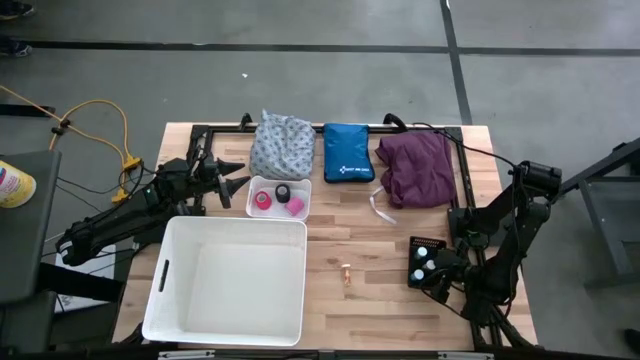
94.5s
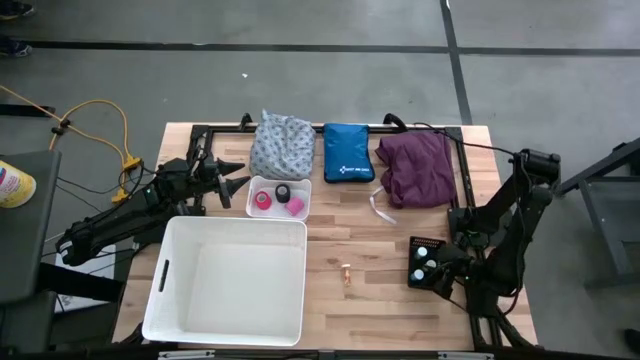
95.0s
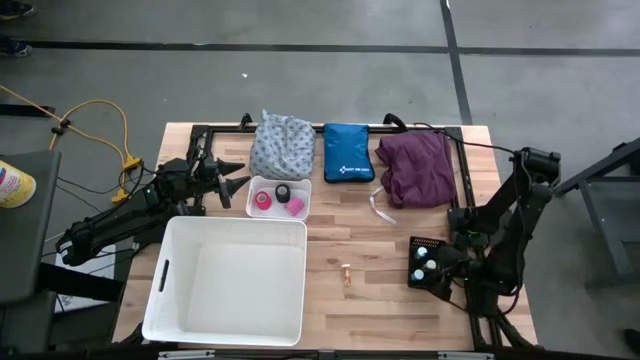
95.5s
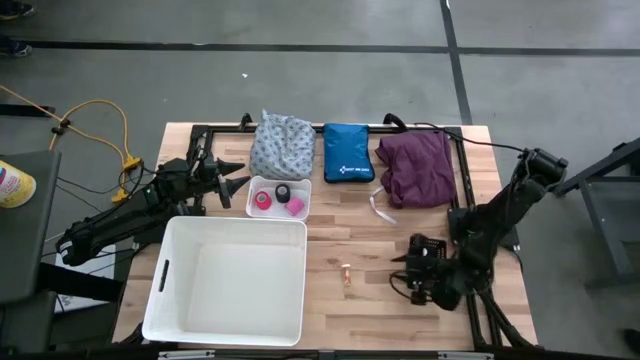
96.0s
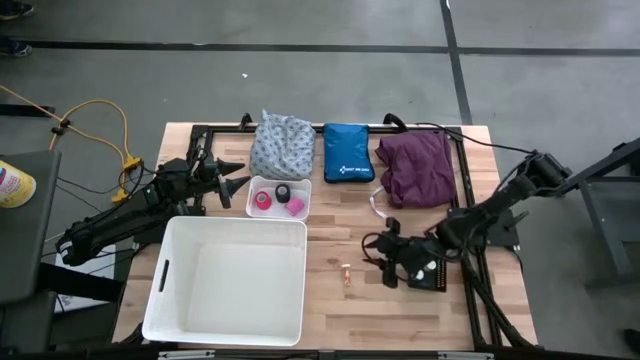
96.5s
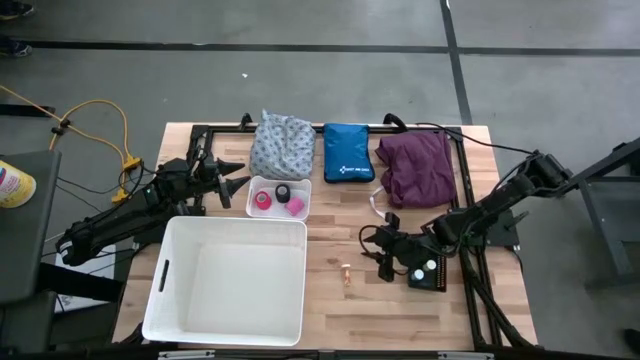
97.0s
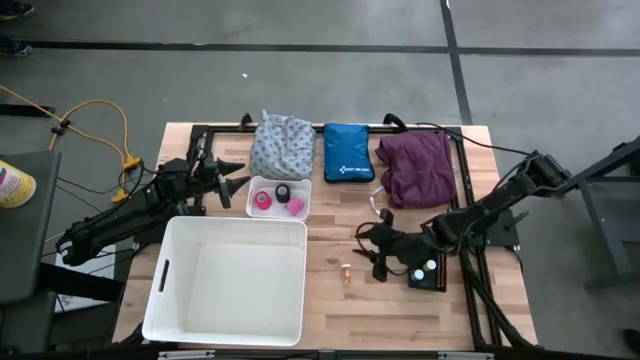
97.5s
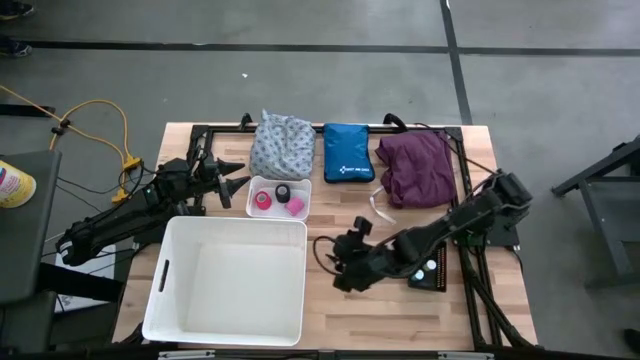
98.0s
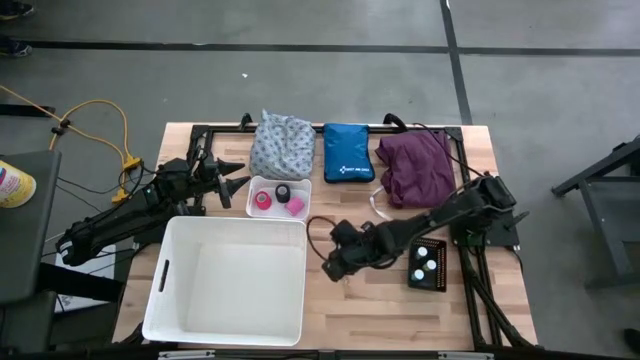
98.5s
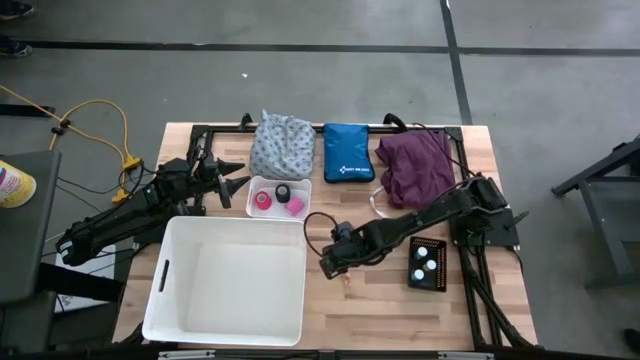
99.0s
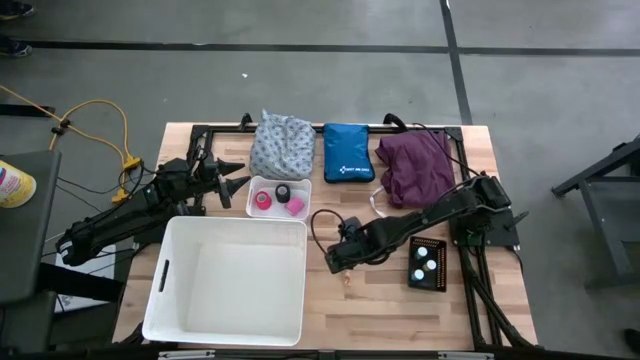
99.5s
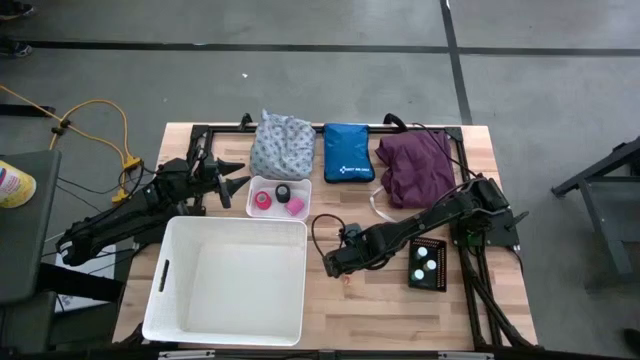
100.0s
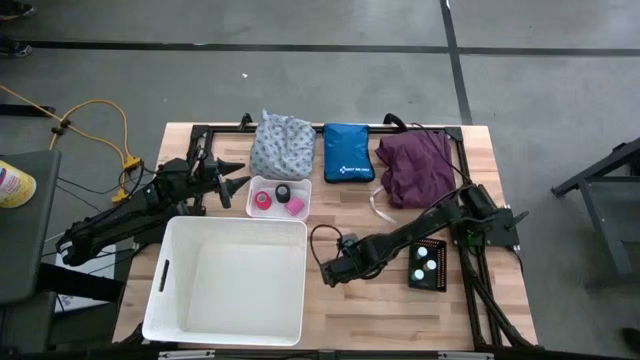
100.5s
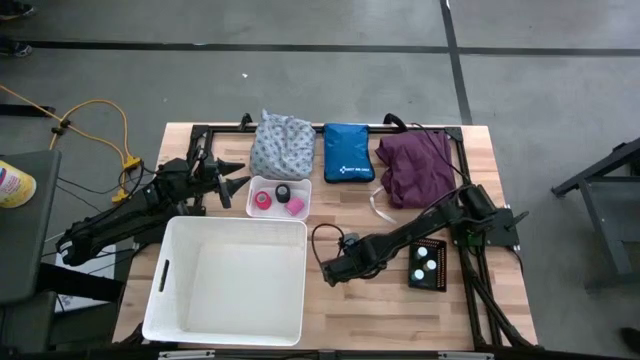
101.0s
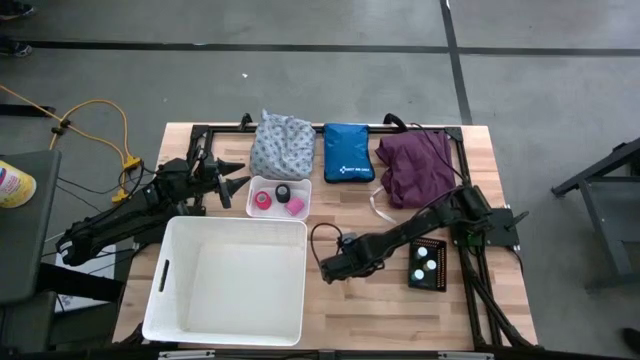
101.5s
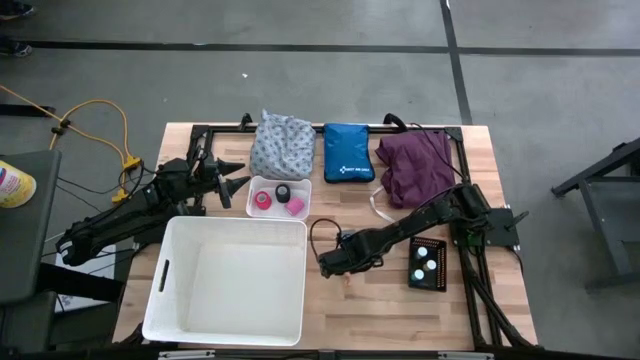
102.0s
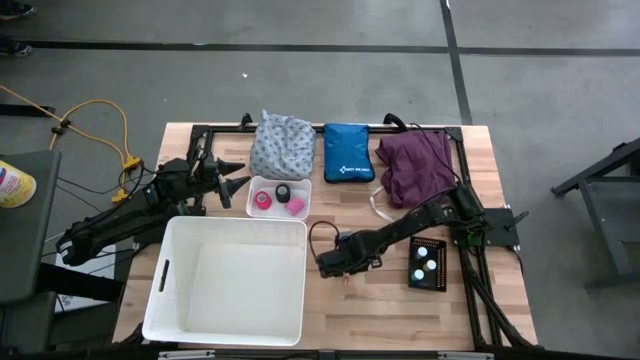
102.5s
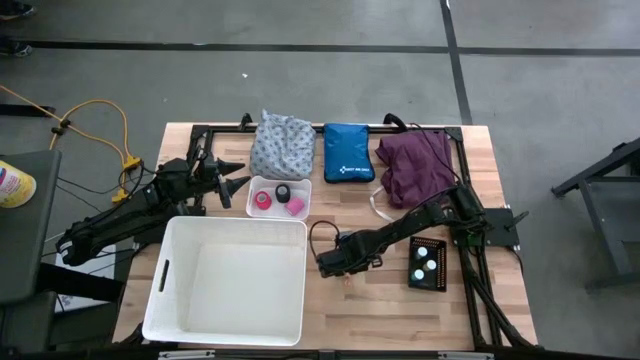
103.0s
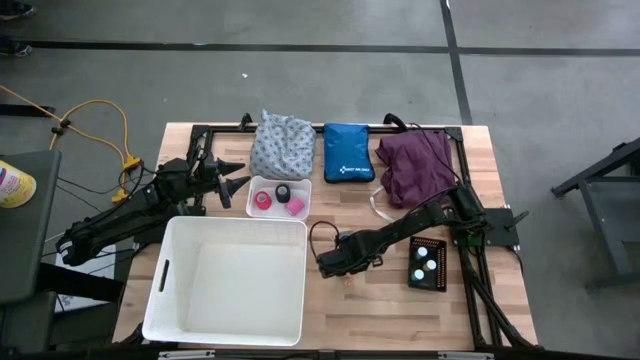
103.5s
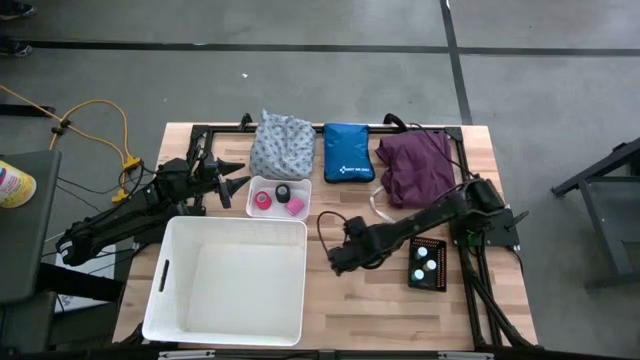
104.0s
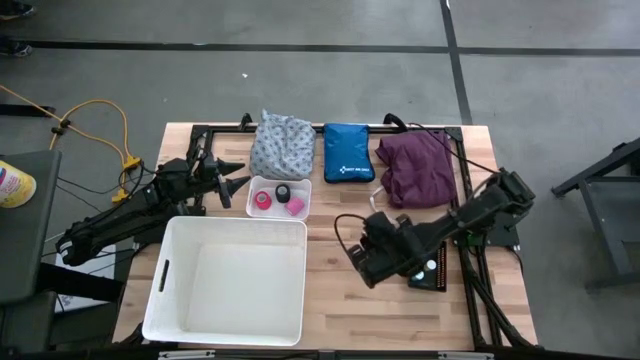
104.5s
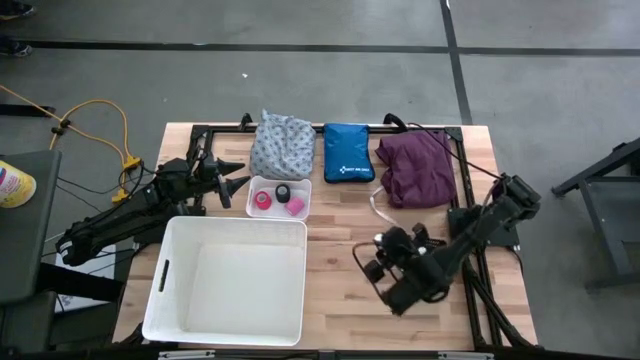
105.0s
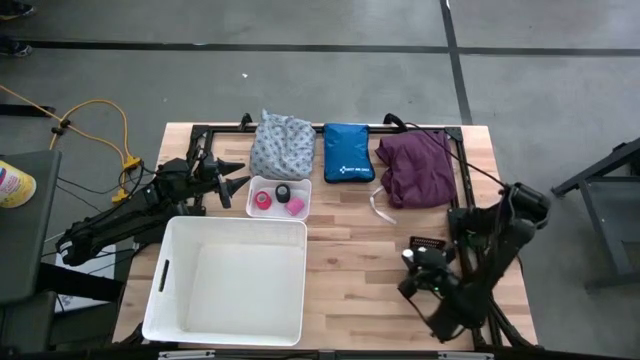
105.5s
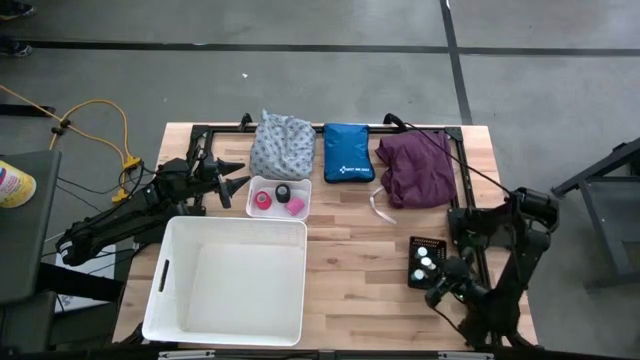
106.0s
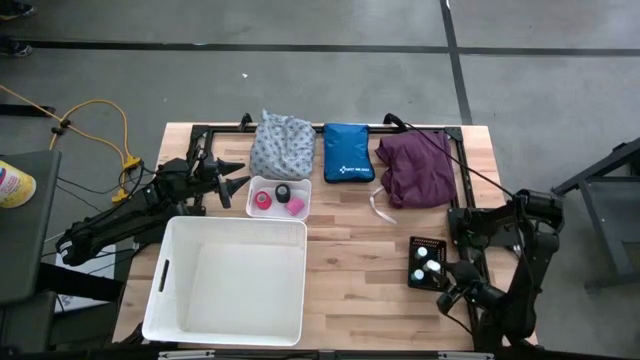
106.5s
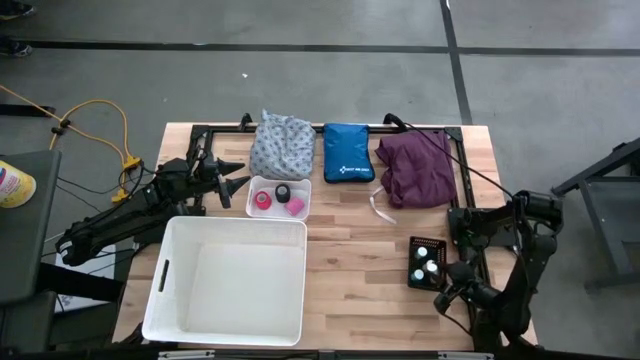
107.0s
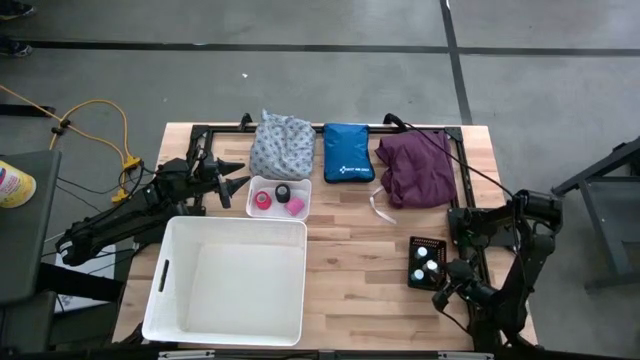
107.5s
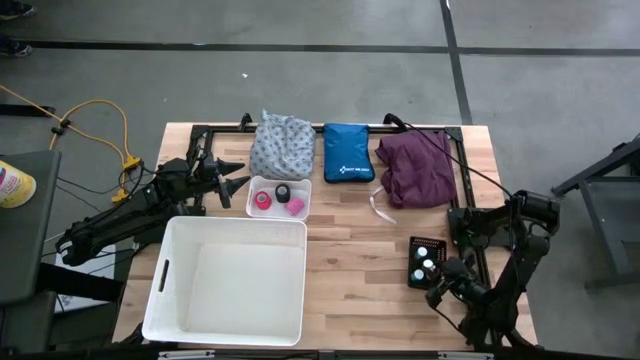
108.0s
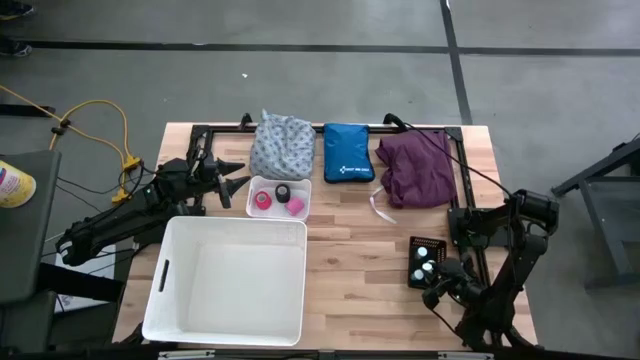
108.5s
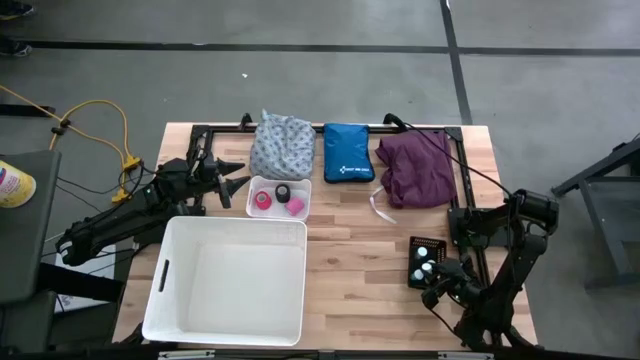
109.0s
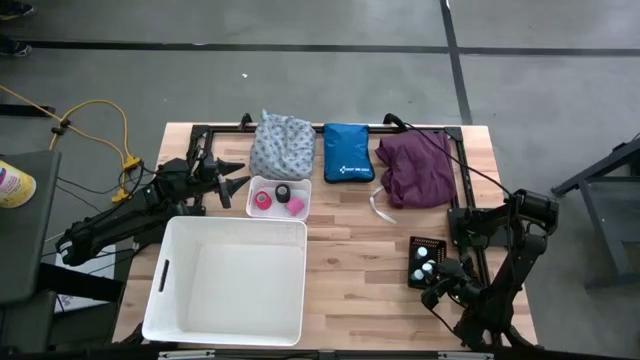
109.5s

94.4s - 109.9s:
Task: Pick & place medical supplies in basket/bin
Put the yellow pill bottle into the black bin

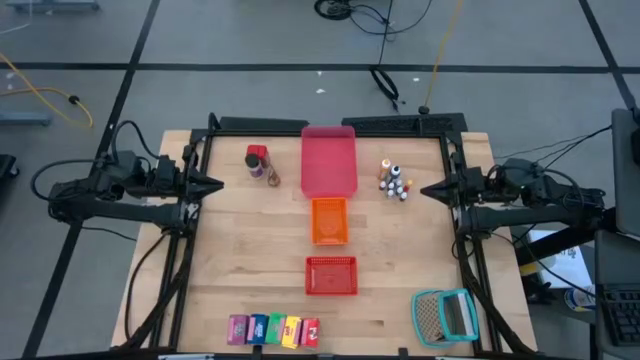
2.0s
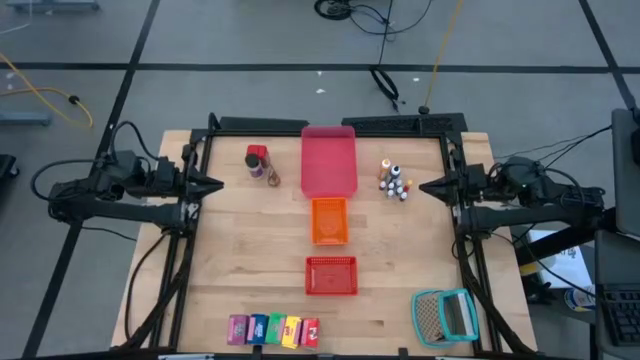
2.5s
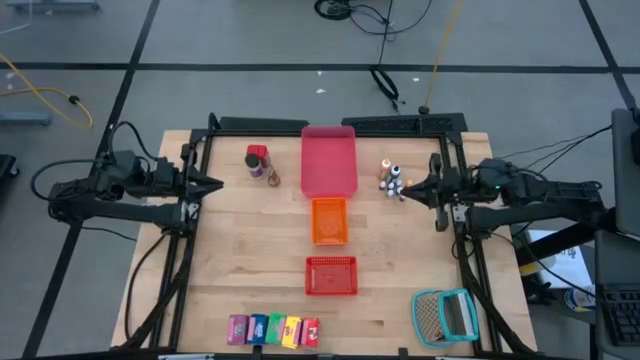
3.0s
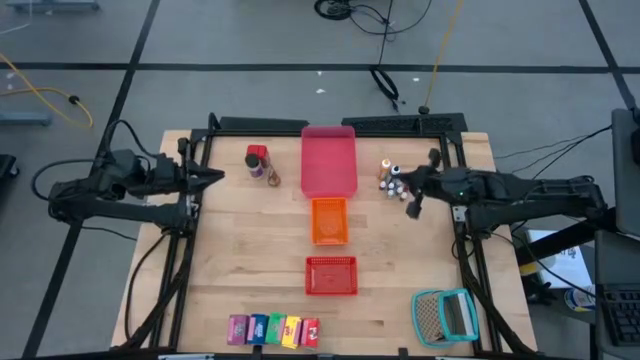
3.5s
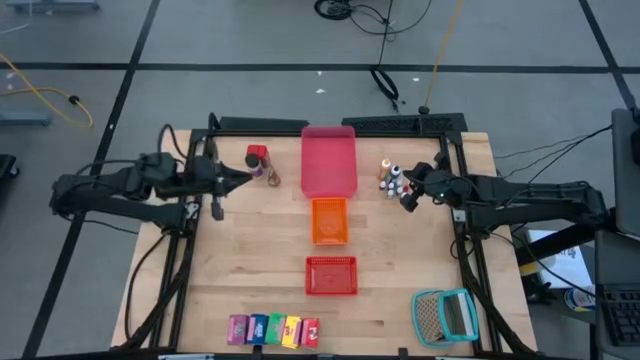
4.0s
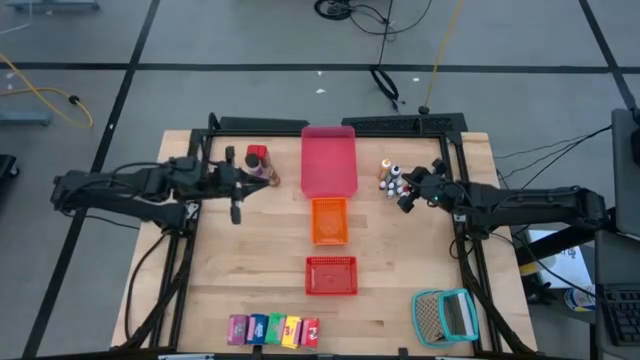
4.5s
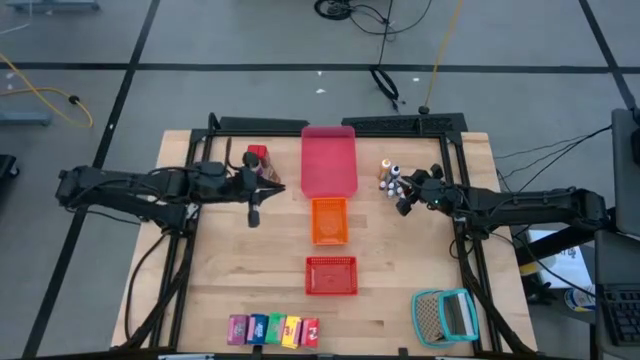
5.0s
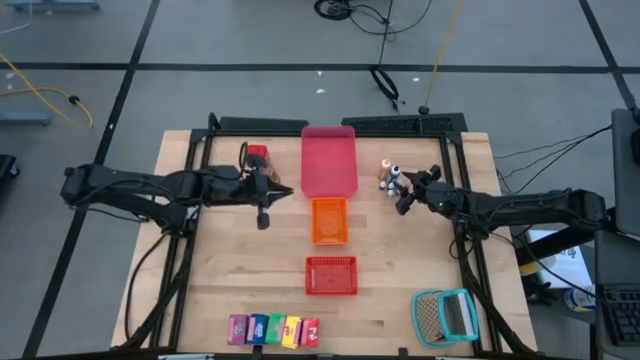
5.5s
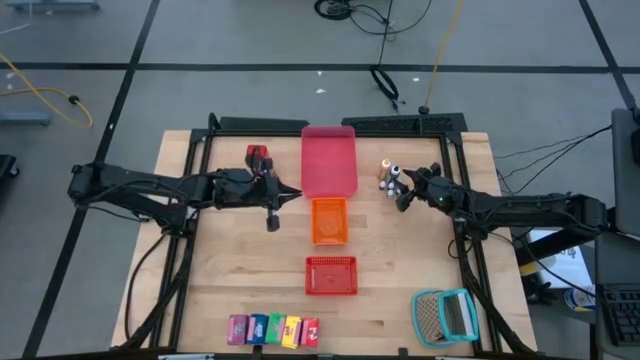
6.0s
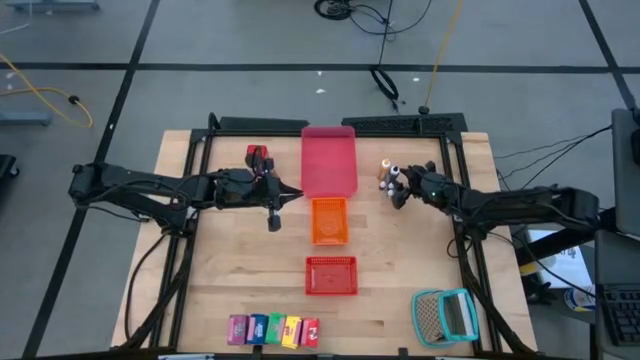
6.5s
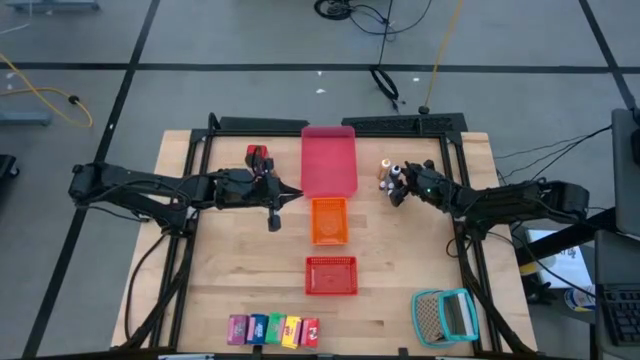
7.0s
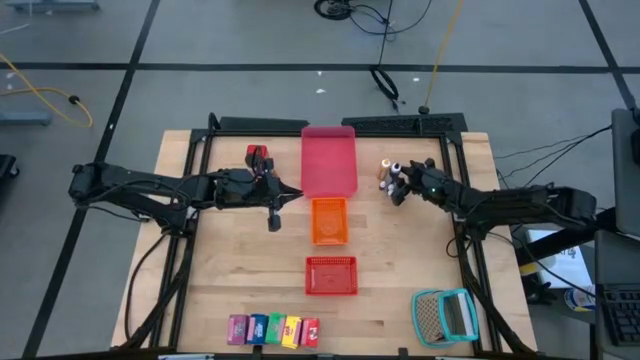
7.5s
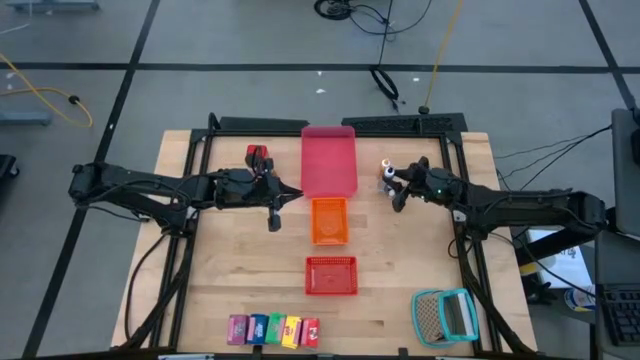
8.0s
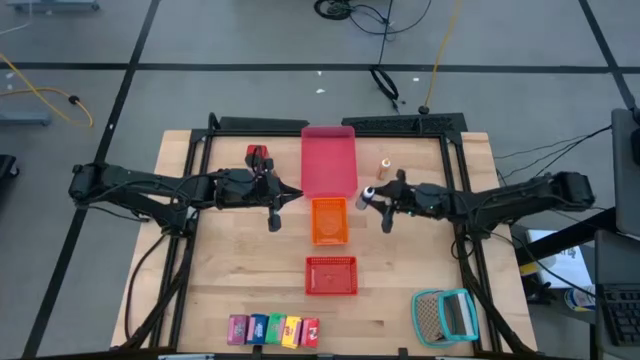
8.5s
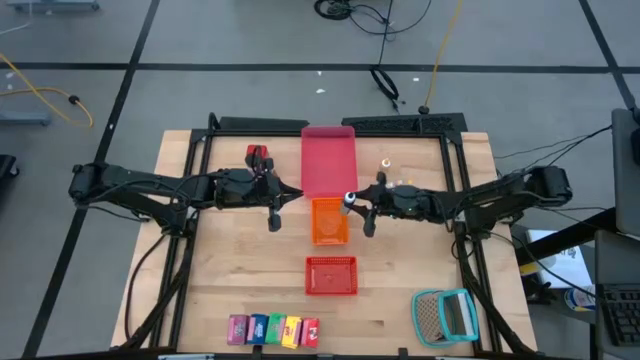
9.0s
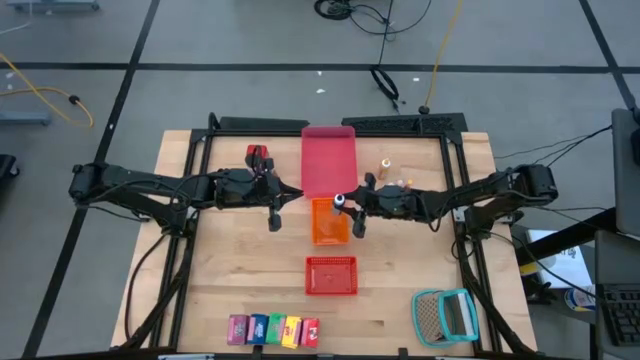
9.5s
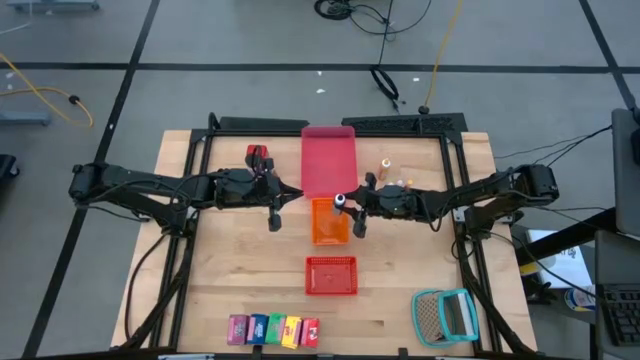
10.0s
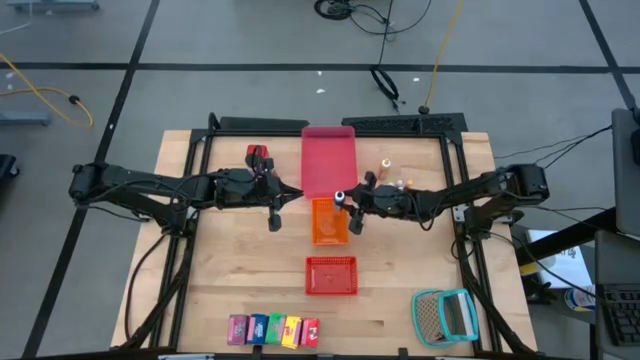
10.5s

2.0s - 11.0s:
Task: Pick & Place Kitchen Items
Put the large black food coloring bottle into the orange basket
